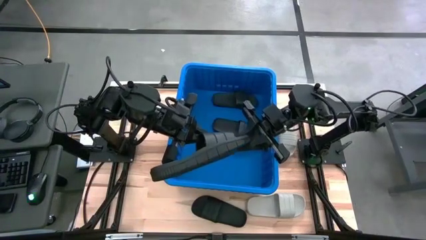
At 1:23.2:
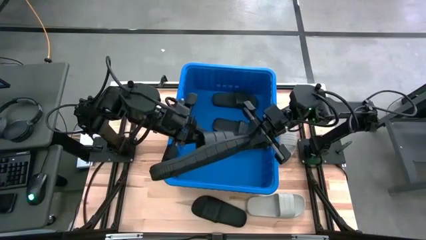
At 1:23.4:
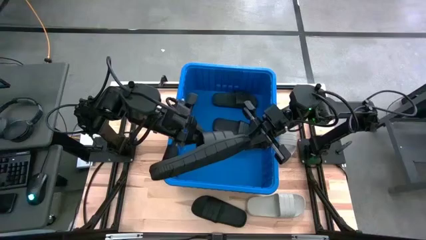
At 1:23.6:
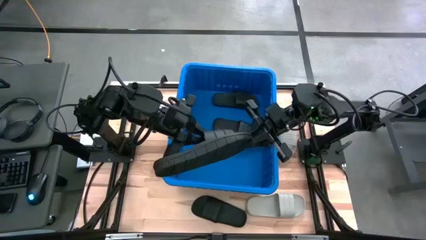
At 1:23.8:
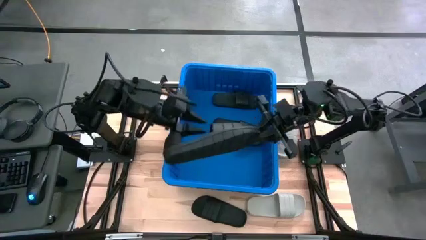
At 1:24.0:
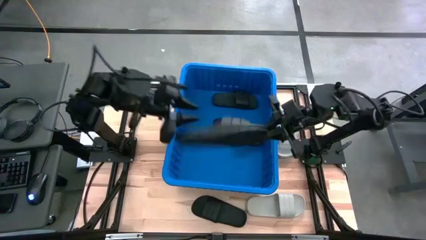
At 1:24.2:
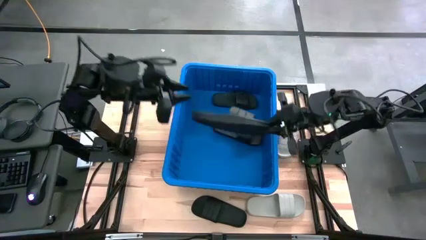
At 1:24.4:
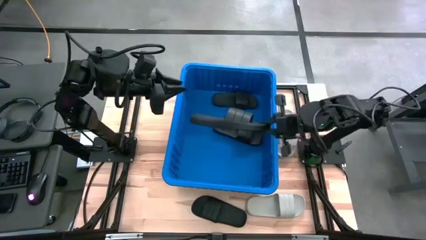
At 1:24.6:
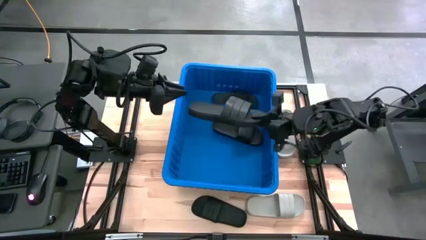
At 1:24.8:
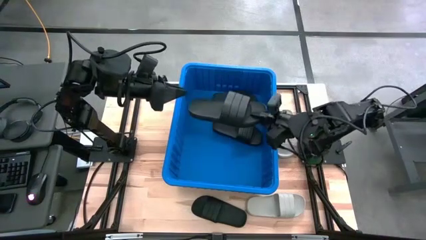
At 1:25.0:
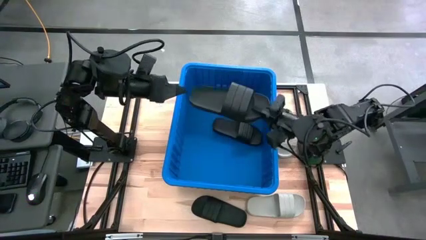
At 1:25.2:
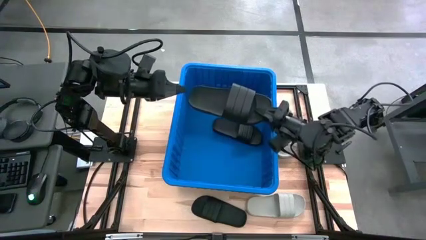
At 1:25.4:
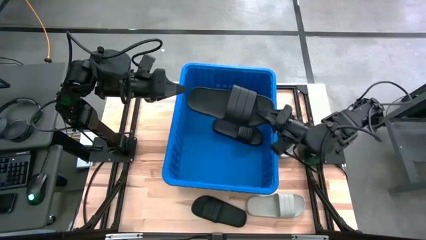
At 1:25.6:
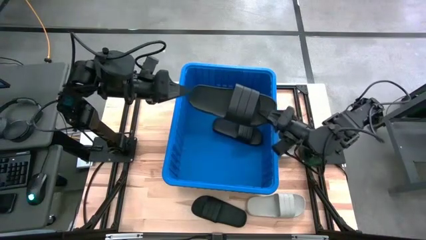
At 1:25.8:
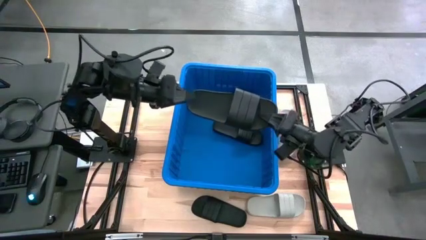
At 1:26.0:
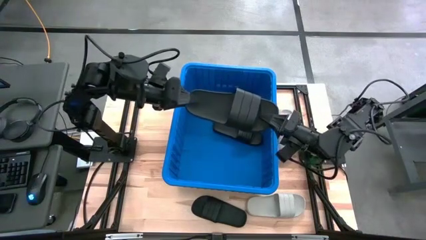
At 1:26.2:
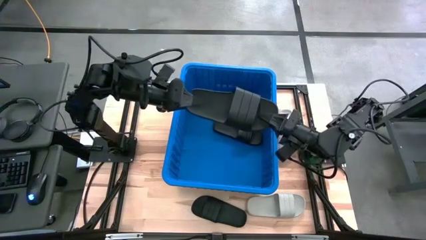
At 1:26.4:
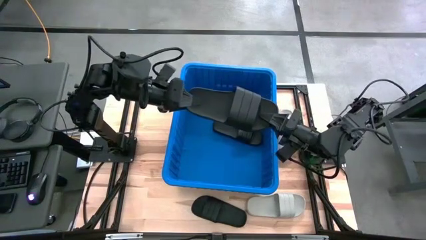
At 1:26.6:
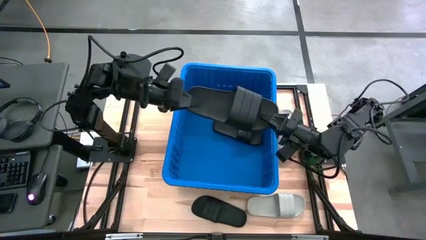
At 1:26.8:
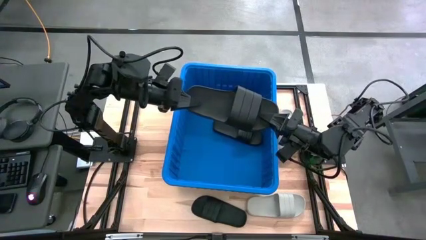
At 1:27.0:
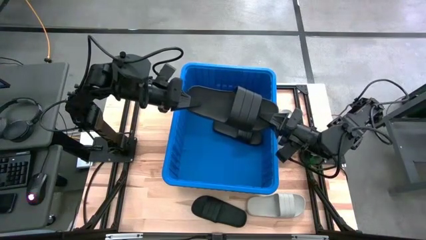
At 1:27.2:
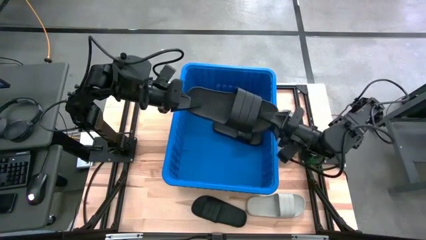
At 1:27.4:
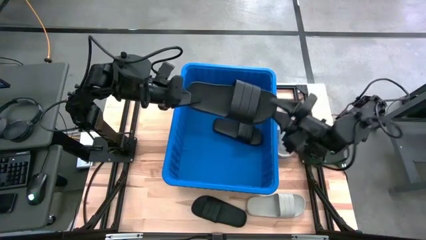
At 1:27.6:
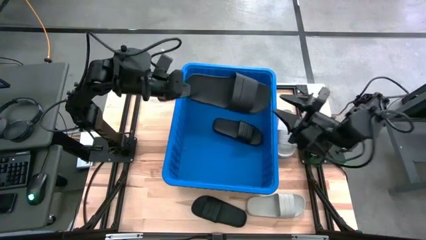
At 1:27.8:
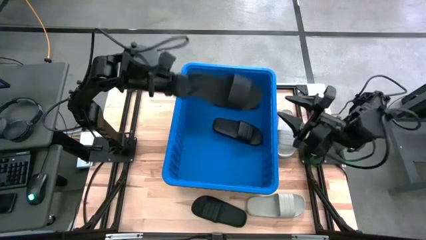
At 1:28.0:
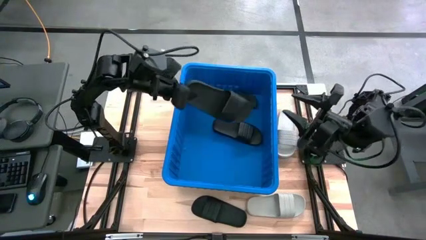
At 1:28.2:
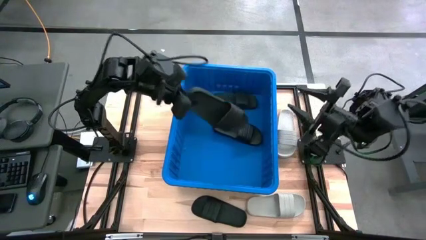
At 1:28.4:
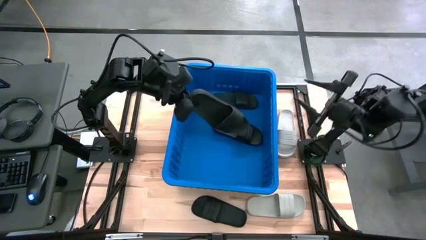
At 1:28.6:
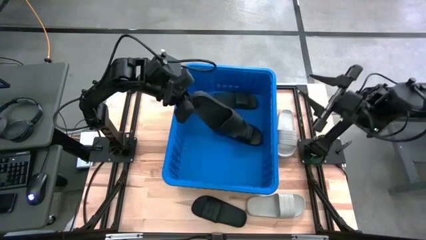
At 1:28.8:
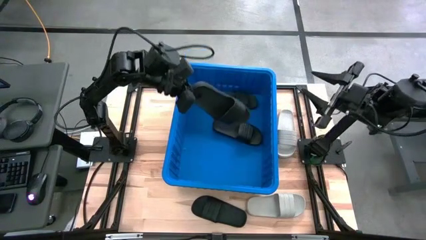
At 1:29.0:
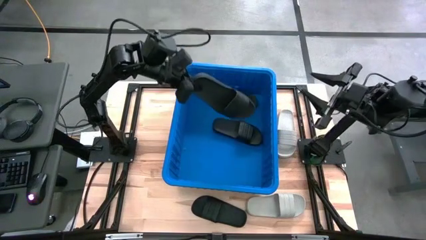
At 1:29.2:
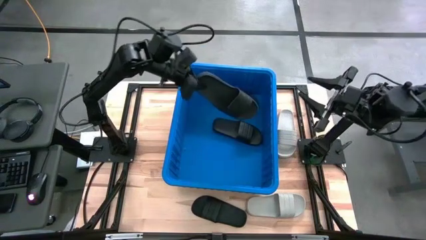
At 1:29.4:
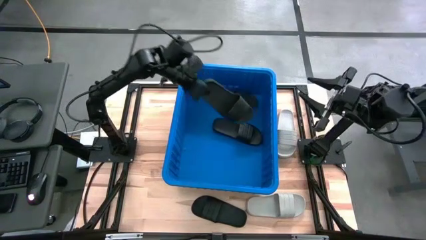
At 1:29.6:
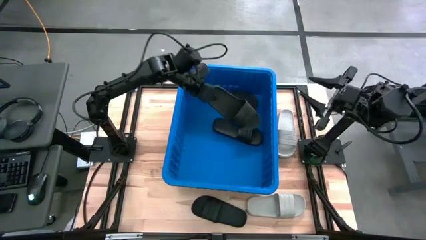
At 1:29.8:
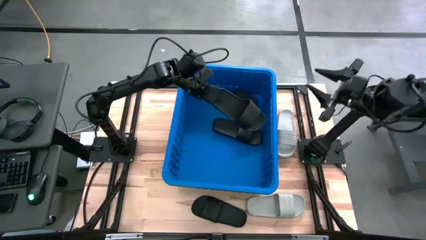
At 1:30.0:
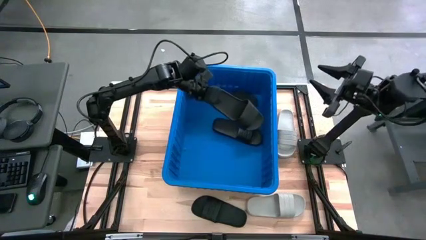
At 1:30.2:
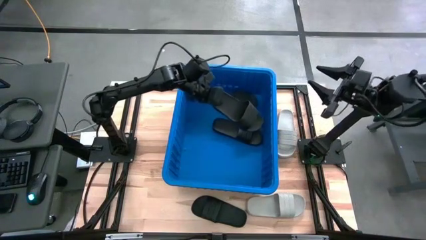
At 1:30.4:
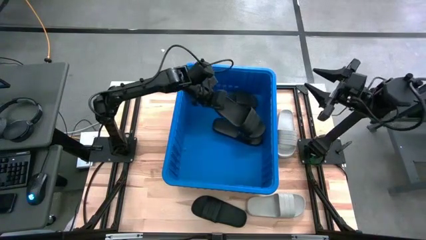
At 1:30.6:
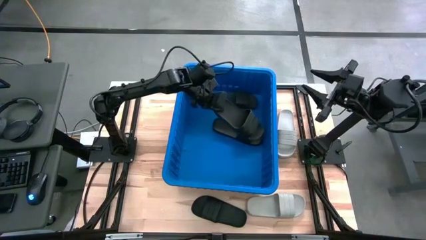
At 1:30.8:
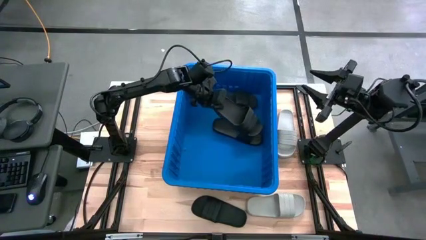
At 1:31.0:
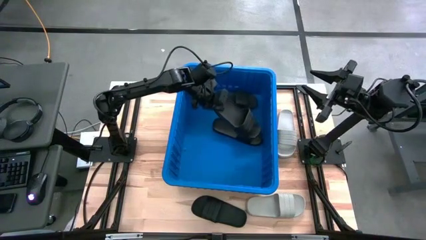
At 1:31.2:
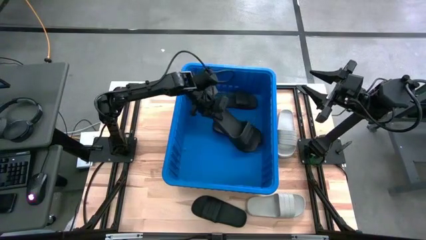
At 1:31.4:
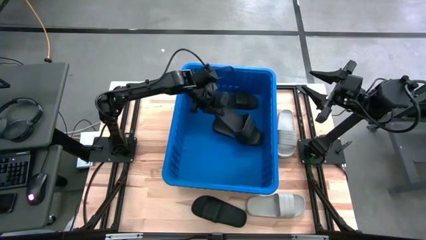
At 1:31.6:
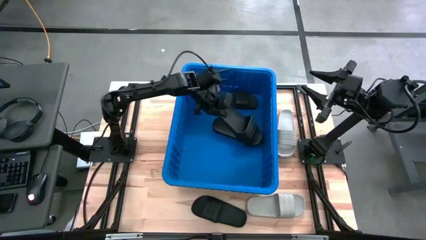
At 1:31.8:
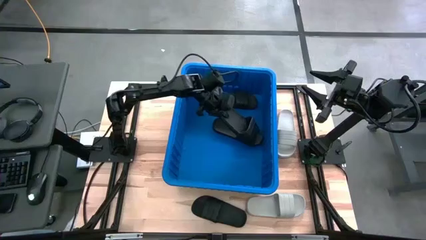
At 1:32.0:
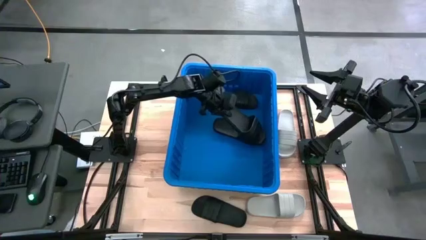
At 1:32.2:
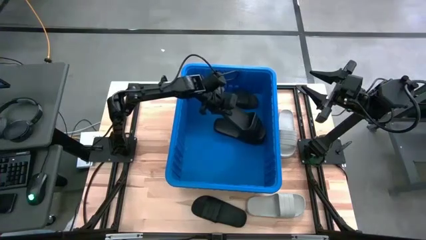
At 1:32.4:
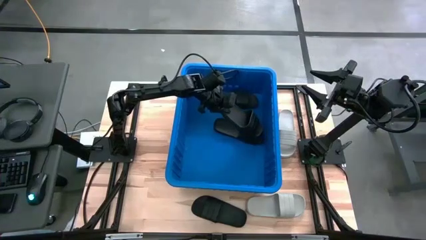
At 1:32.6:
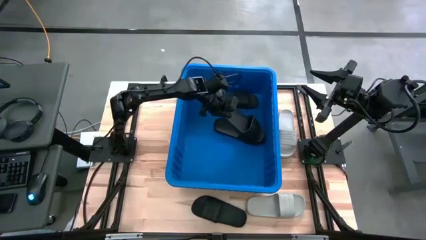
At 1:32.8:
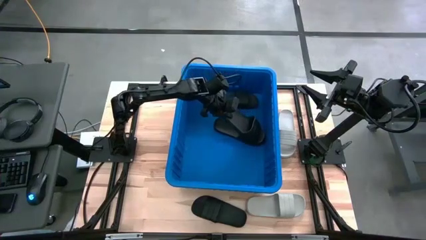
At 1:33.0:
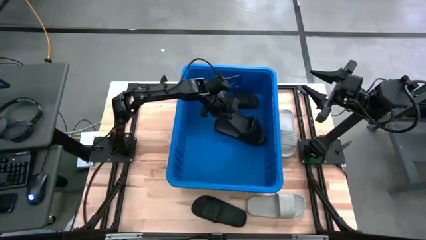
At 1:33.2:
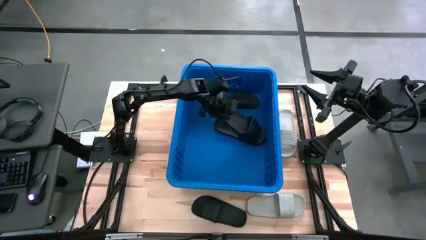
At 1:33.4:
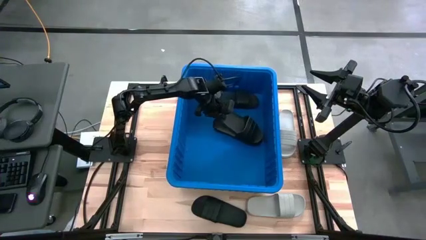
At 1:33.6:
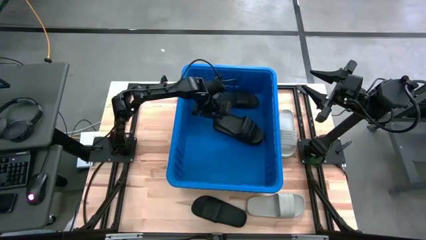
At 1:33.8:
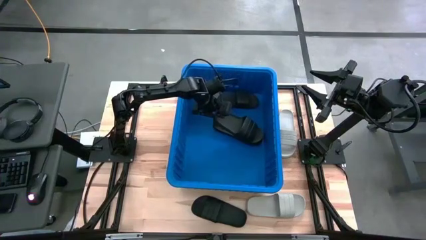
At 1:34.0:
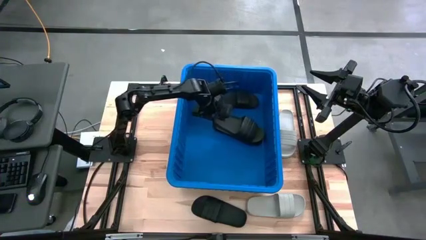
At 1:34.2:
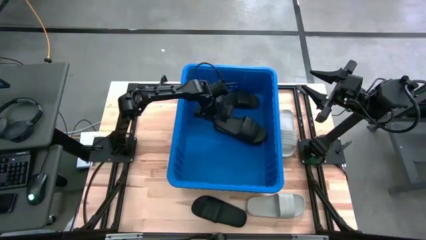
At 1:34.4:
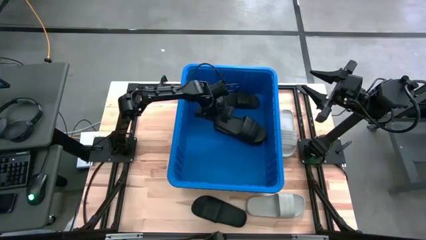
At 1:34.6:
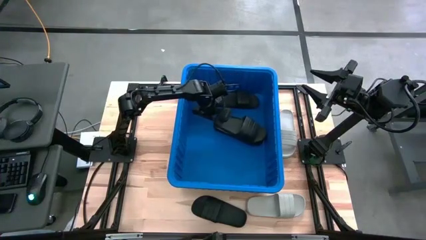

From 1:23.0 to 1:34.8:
Task: Pick and place slides into bin
Stack the black slipper on the bottom black slipper in the blue bin

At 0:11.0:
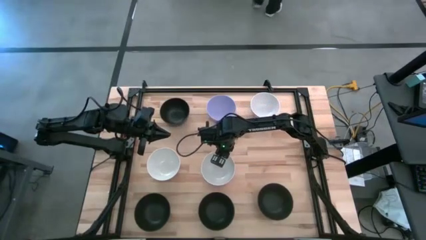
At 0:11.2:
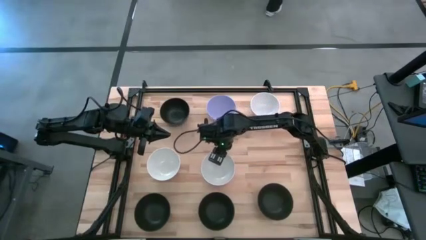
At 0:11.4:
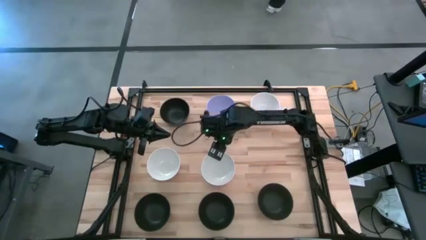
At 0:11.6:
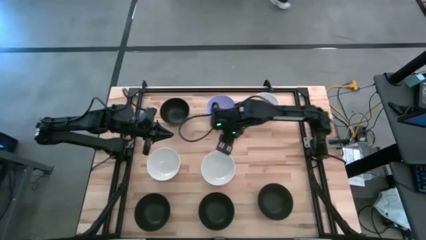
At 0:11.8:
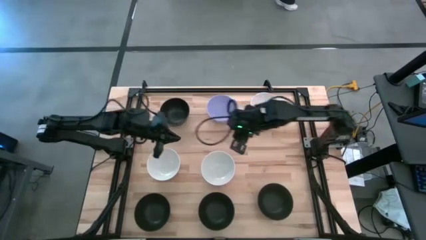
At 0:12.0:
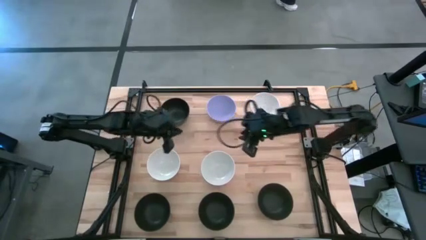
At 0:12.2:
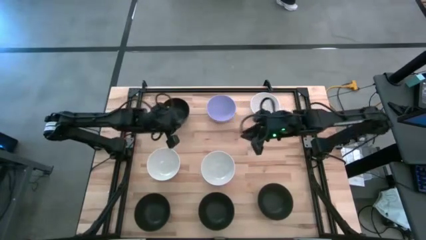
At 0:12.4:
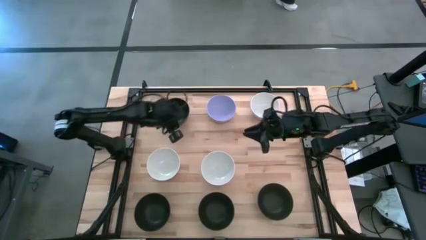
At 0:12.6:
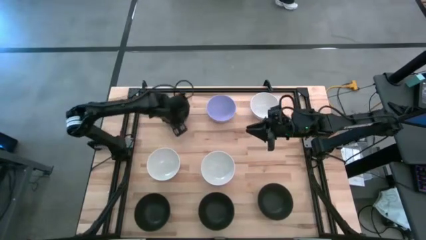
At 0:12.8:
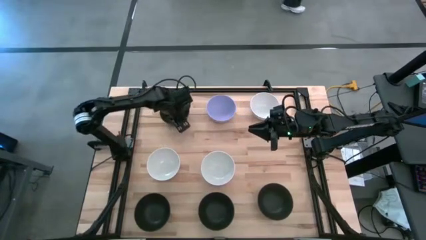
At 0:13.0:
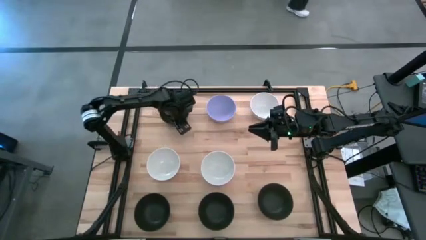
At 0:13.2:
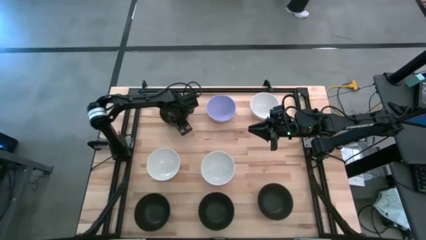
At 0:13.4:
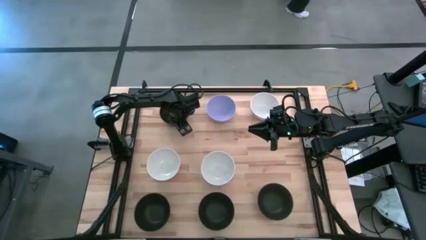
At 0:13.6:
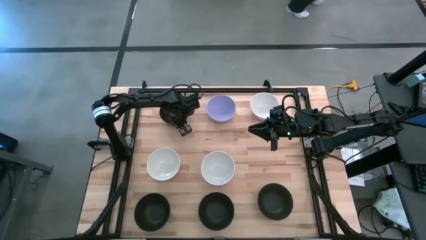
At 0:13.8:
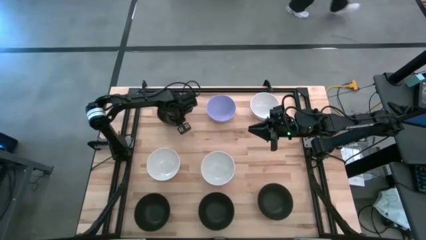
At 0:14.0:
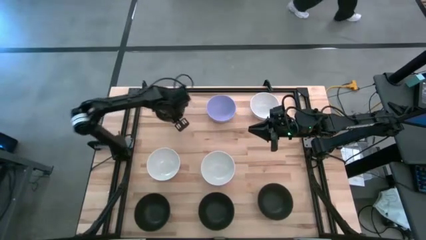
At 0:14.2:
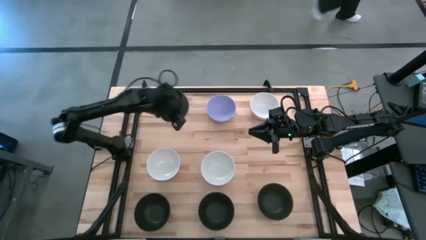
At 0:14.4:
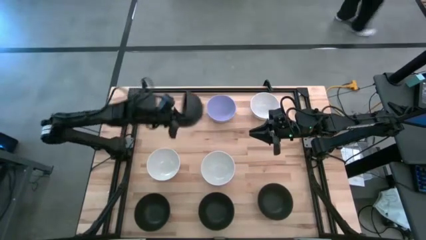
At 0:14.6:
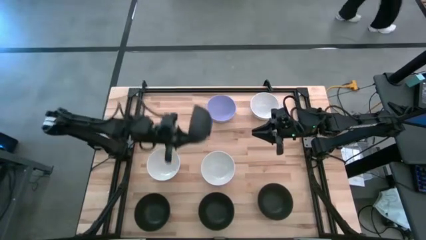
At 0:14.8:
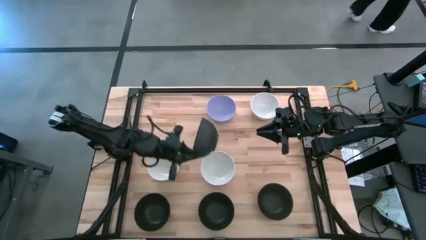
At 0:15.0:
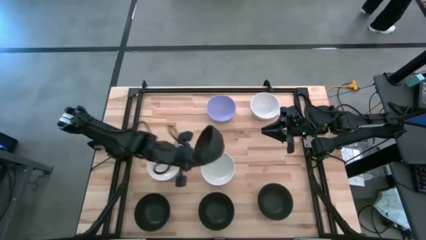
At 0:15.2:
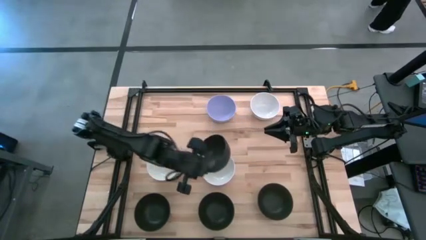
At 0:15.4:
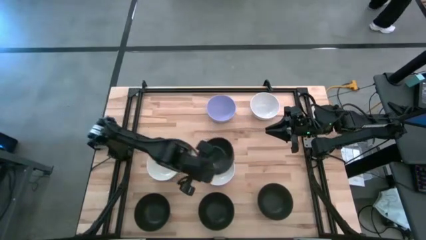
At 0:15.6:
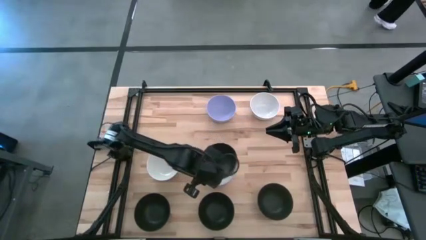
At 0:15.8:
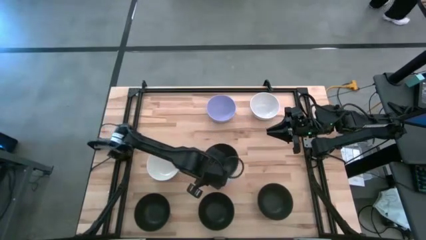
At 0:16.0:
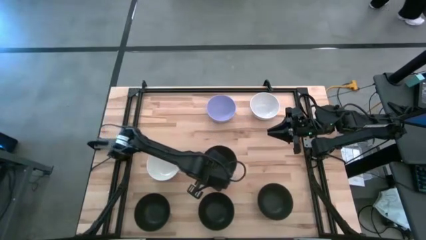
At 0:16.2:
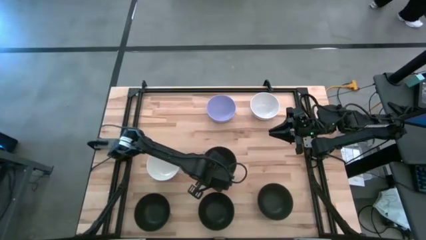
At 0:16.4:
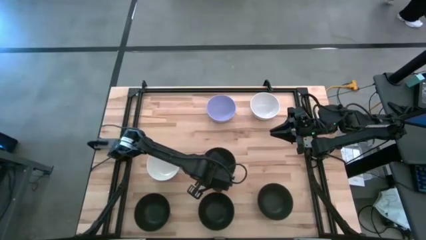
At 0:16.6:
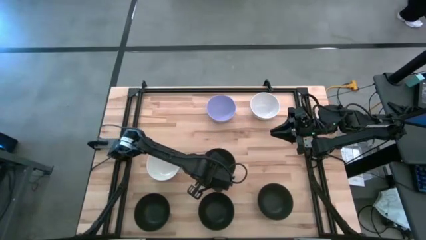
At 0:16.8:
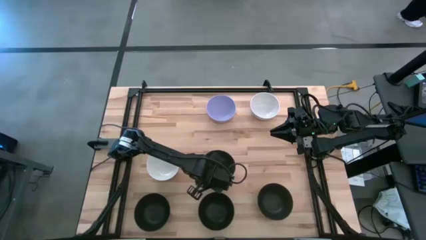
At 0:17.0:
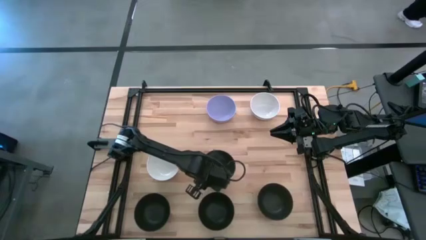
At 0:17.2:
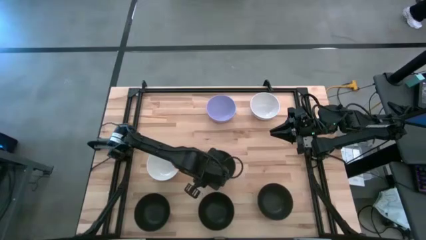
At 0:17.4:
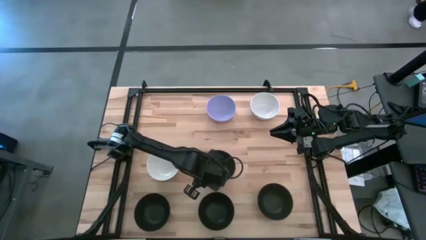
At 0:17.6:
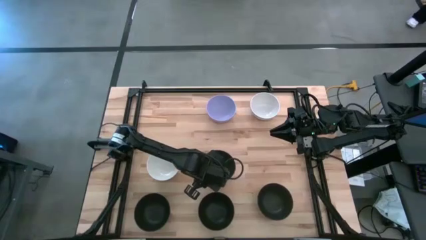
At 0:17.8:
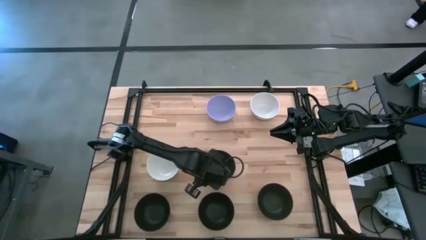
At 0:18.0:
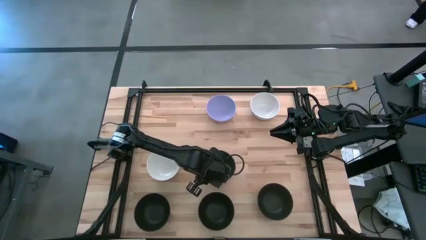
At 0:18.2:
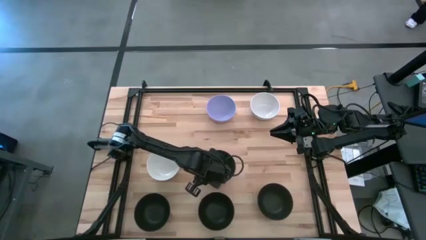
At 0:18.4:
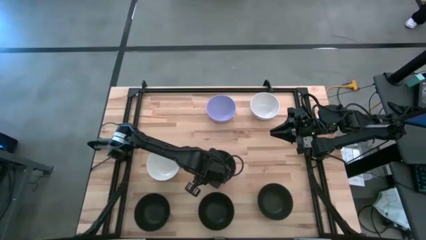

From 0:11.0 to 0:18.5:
Task: Nest bowls inside each other
Stack the top left black bowl on top of the bottom right white bowl
